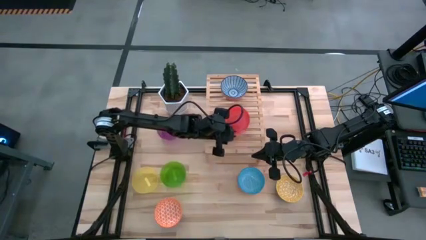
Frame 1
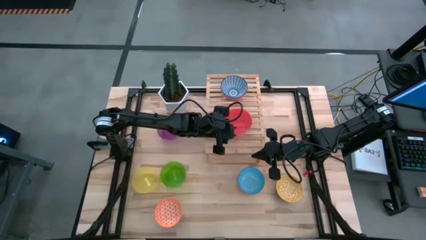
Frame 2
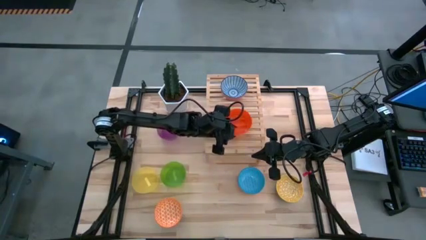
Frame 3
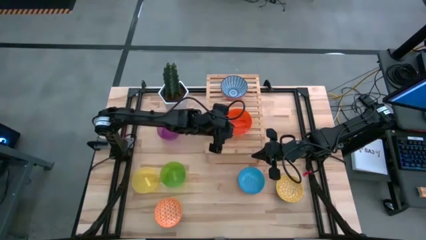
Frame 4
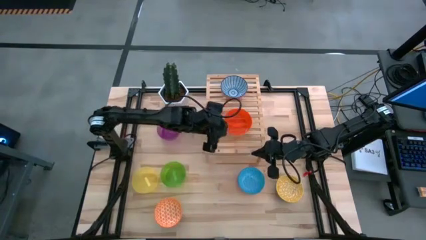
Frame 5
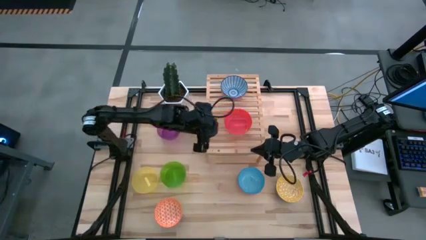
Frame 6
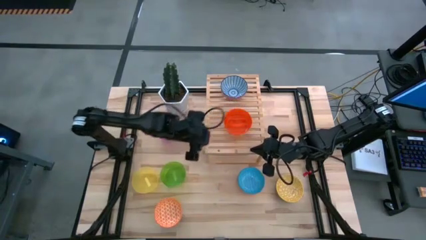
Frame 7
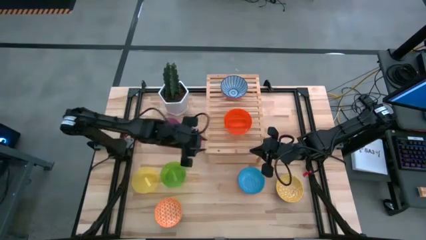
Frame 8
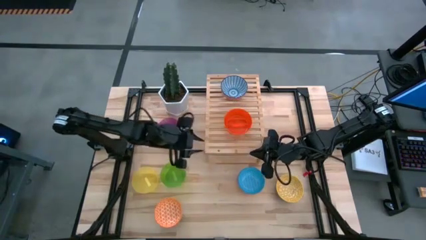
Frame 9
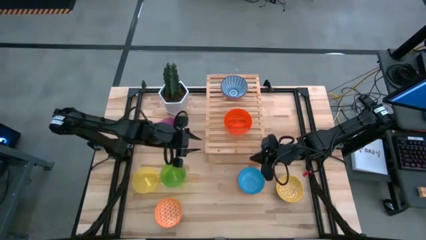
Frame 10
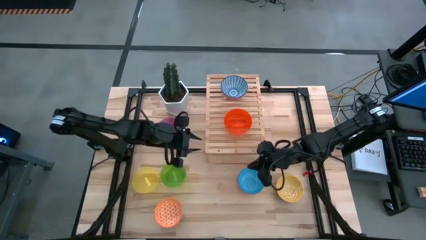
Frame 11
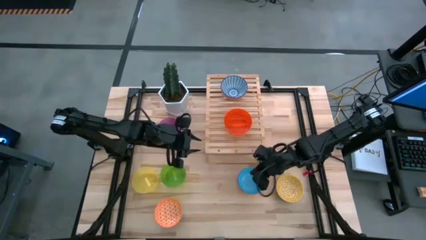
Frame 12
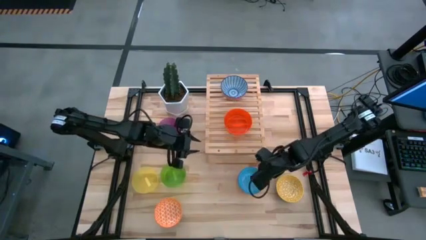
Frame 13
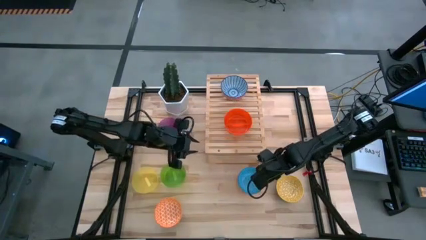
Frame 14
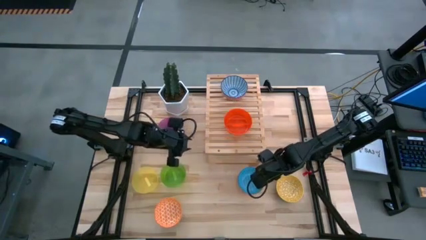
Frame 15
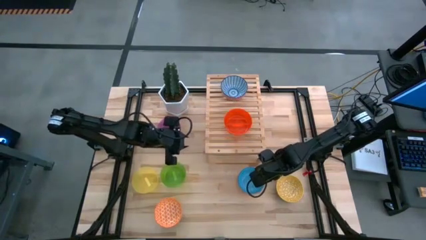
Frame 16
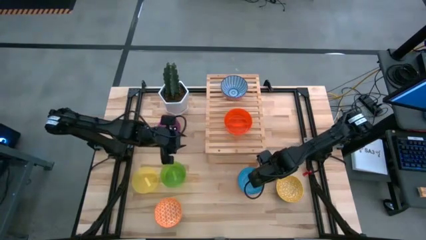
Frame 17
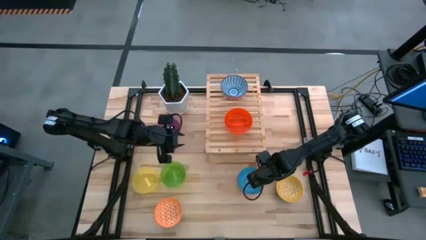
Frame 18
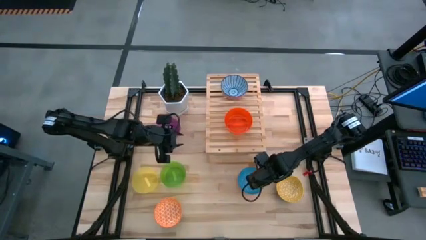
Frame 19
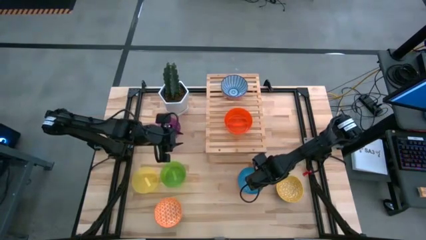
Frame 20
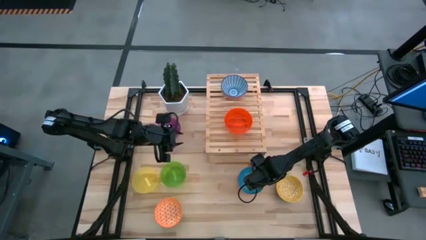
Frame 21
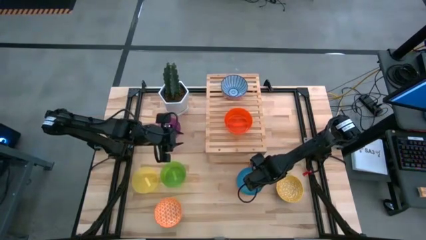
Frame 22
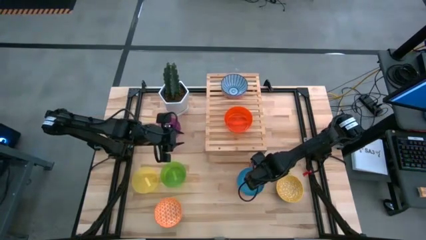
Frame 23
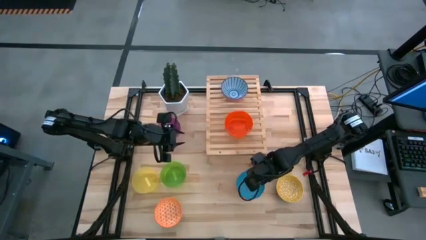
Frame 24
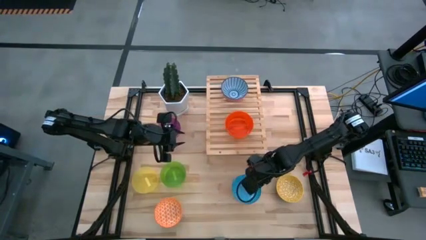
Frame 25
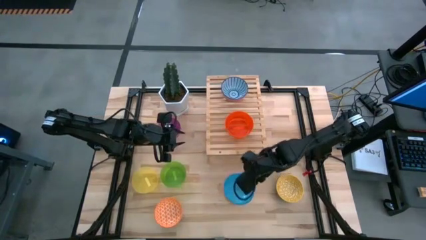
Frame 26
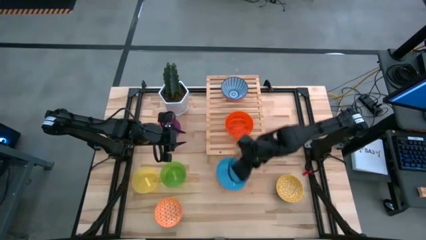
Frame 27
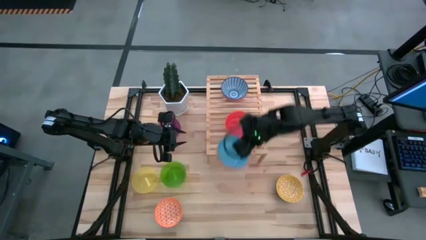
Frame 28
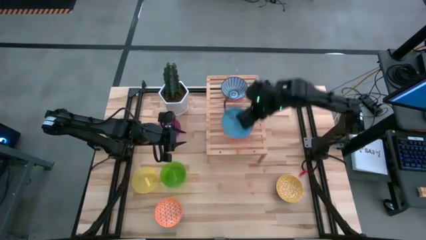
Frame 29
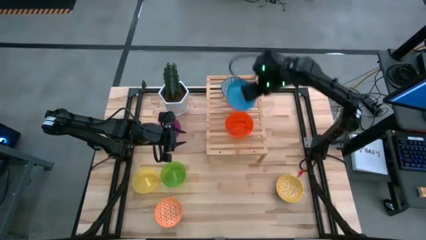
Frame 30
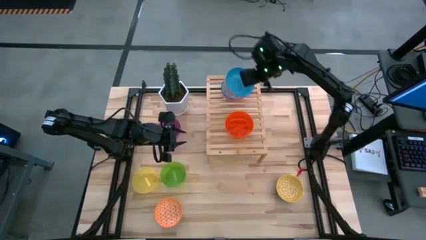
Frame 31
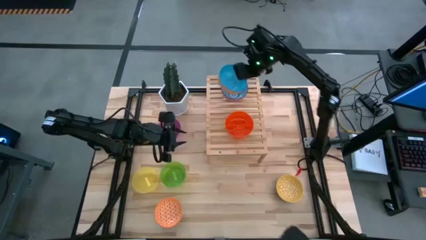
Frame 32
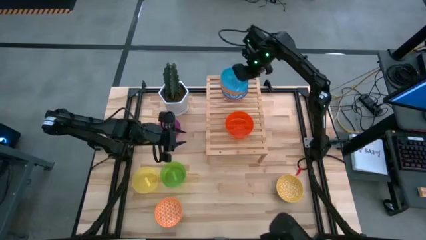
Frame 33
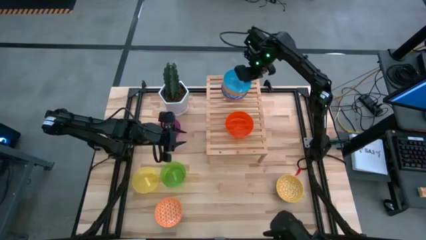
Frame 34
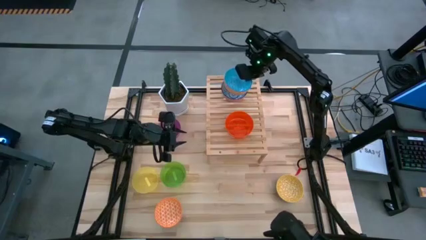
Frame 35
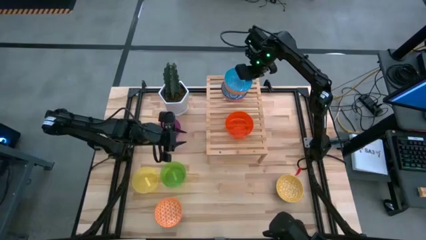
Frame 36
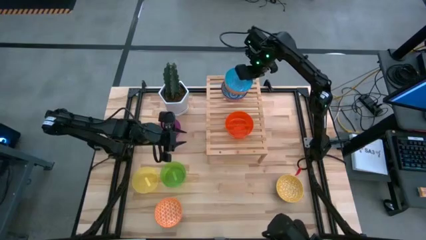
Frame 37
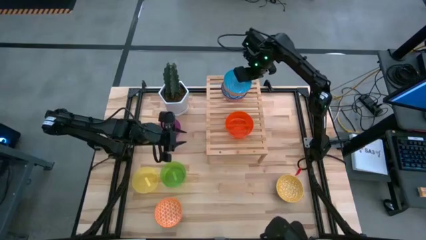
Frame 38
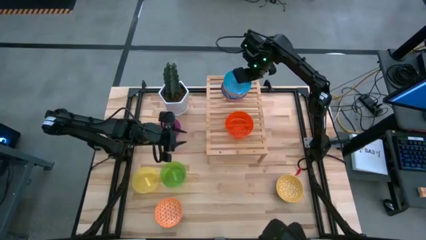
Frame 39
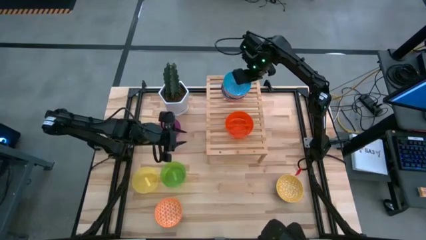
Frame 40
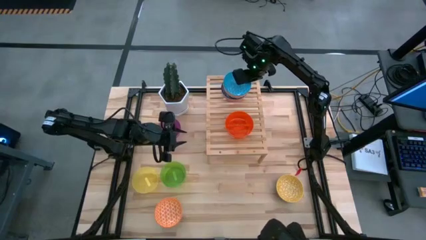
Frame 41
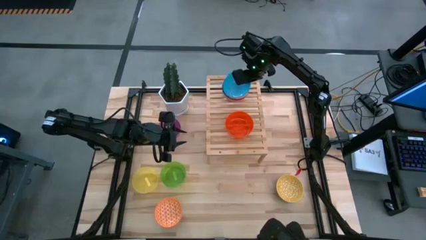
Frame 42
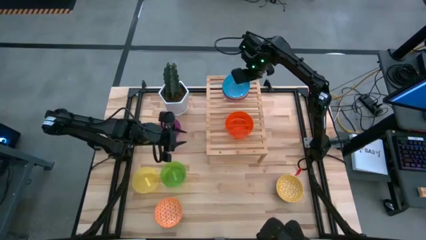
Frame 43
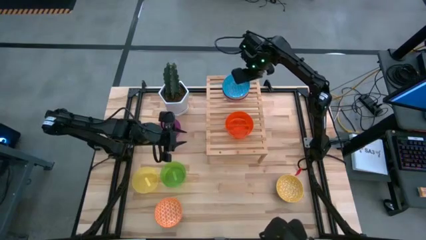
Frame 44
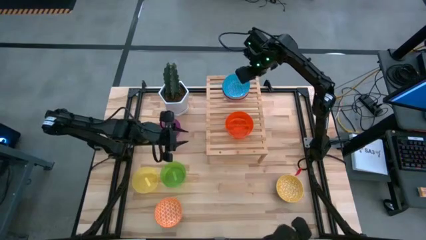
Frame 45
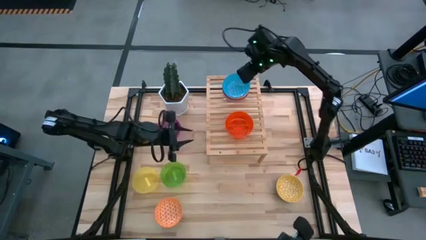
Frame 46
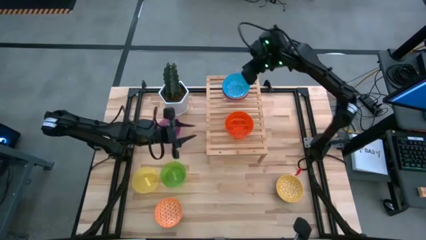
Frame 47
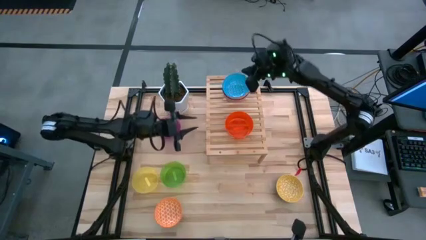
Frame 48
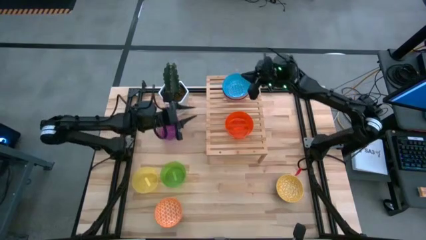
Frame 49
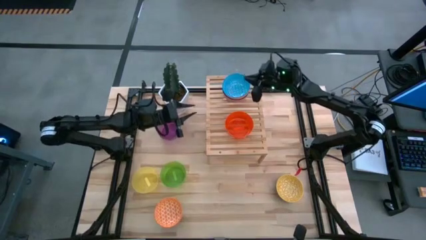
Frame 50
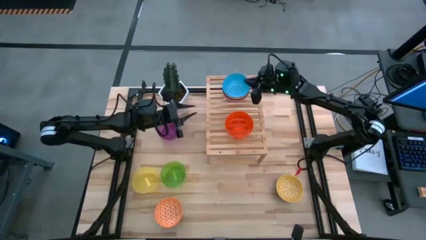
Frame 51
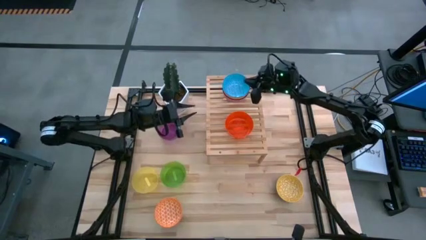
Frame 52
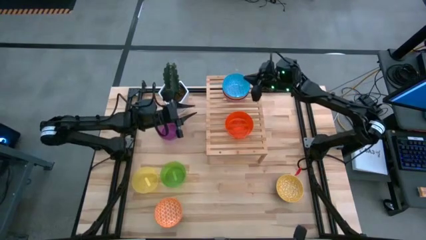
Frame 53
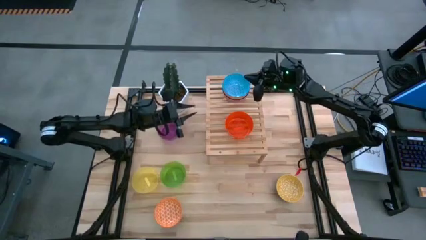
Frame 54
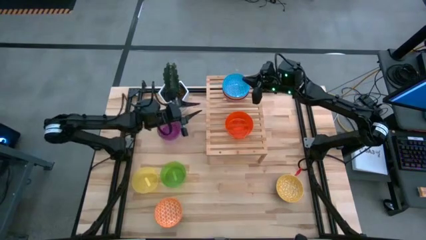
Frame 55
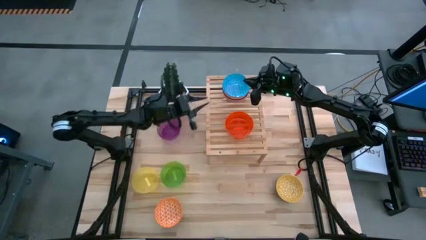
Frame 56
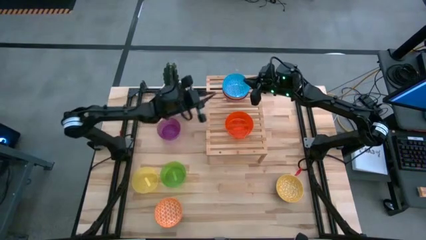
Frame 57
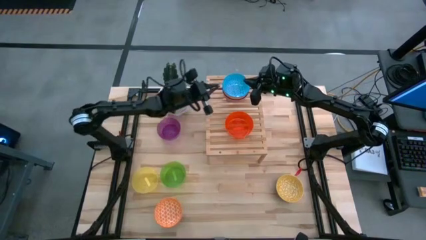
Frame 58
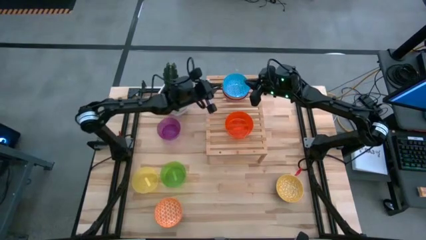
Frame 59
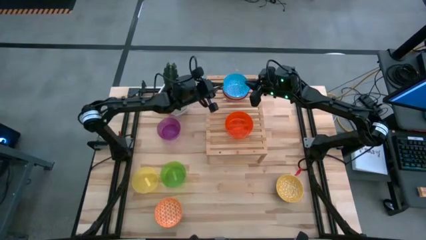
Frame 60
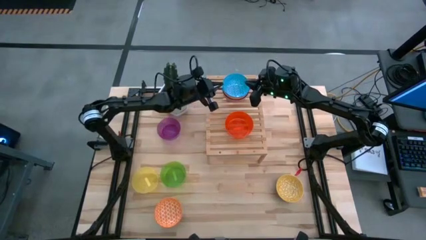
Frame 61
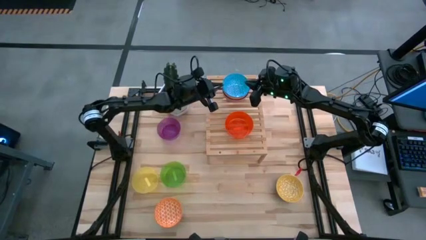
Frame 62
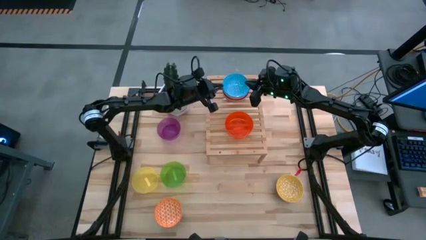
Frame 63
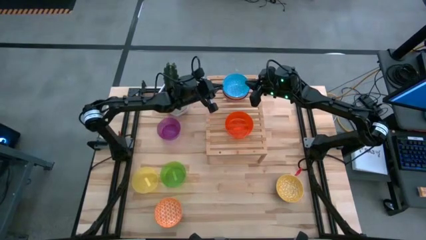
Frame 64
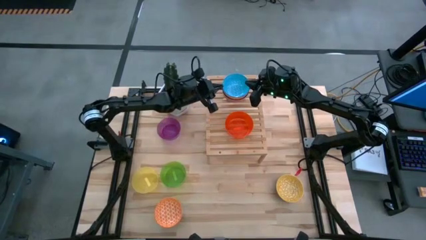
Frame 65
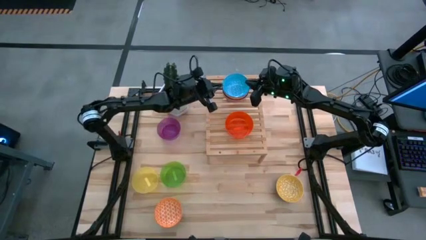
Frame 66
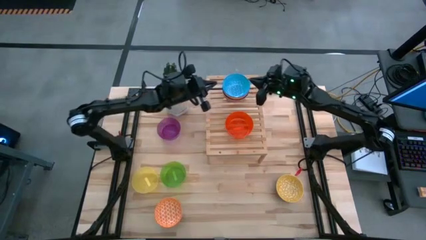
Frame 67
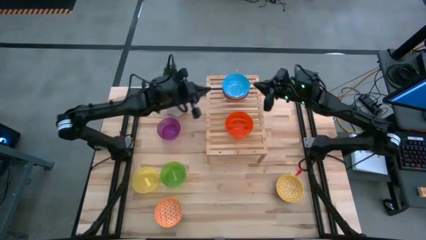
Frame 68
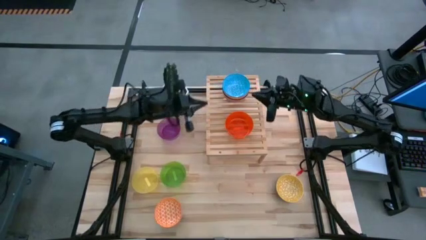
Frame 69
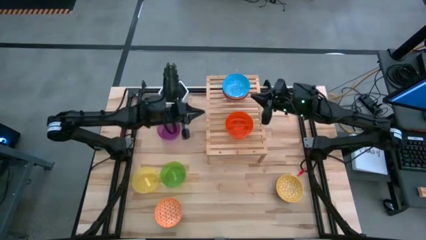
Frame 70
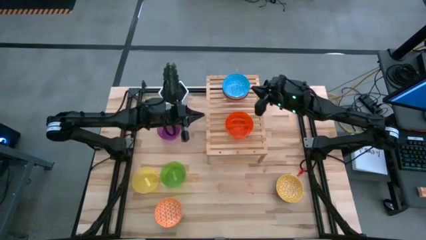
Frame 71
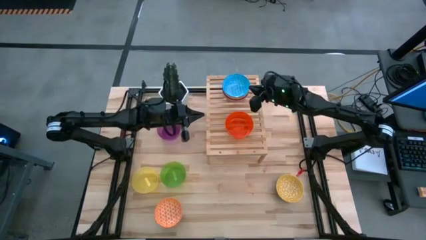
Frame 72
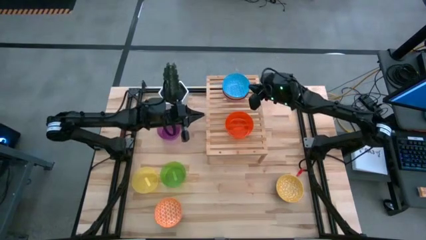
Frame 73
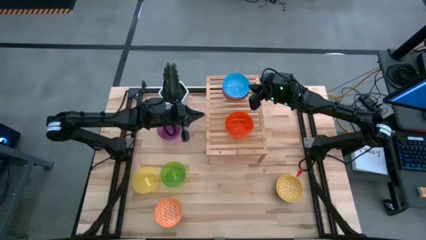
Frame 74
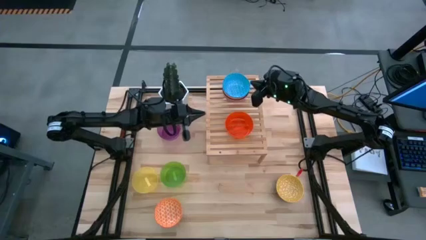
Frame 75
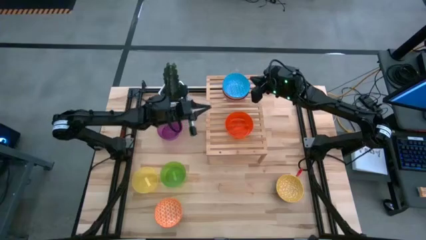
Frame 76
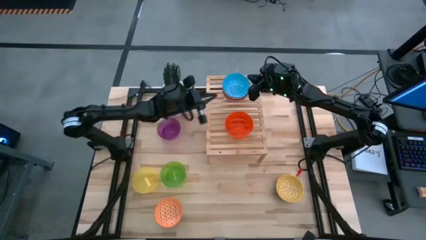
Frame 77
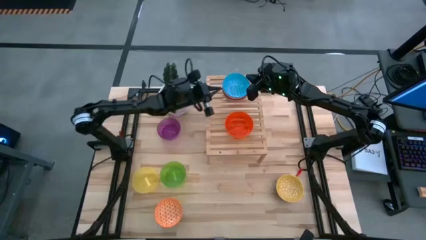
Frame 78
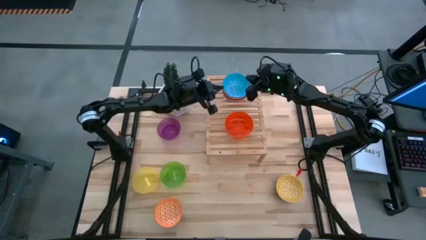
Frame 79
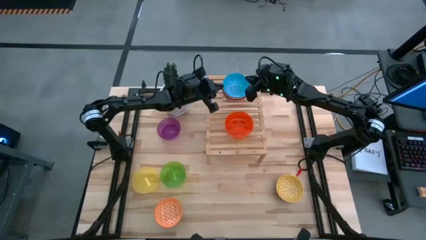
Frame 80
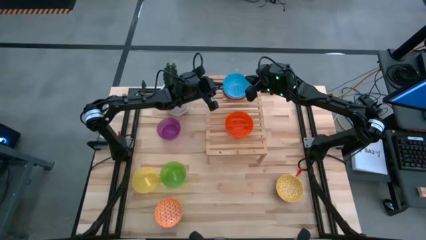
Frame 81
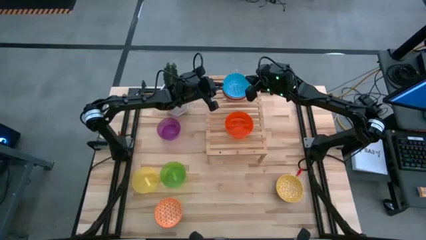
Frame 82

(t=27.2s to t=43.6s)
Task: Place and stack bowls onto a shelf
Stack the blue bowl on top of the blue patterned bowl on the shelf
